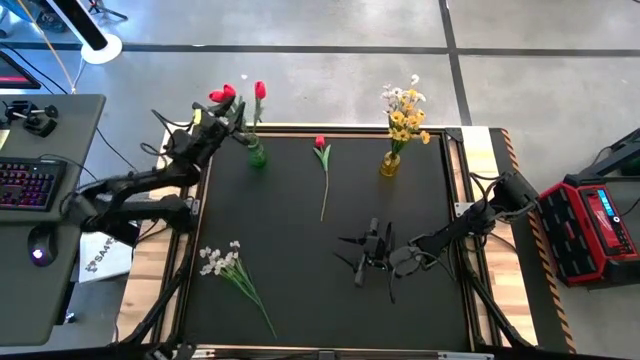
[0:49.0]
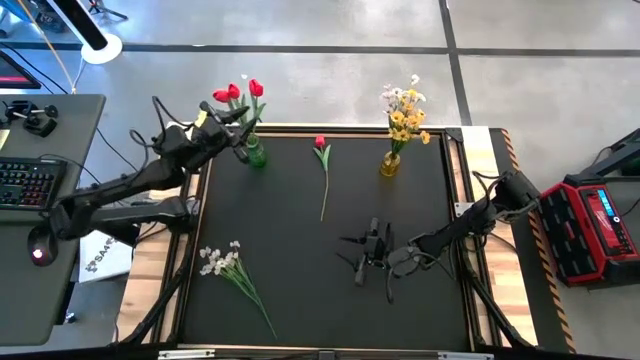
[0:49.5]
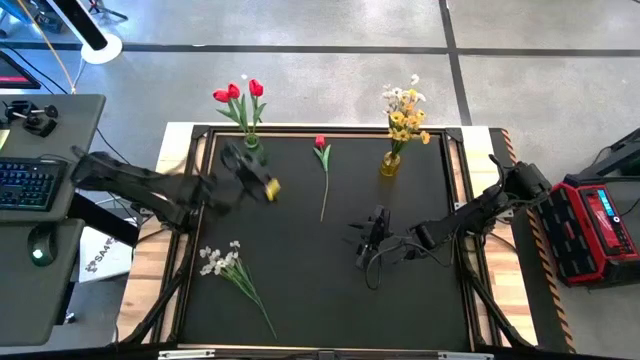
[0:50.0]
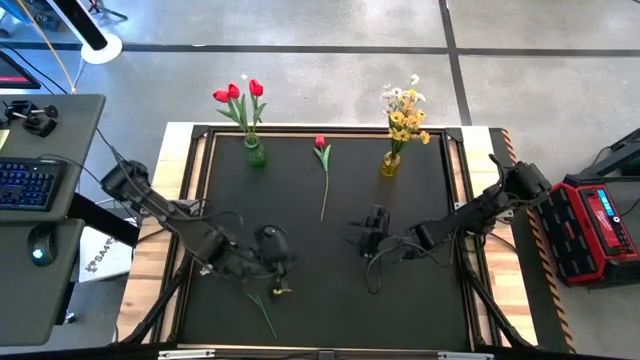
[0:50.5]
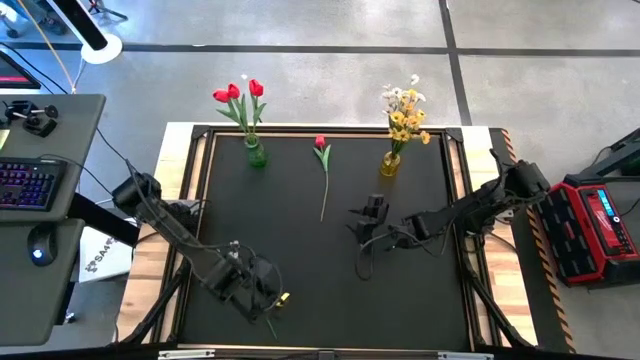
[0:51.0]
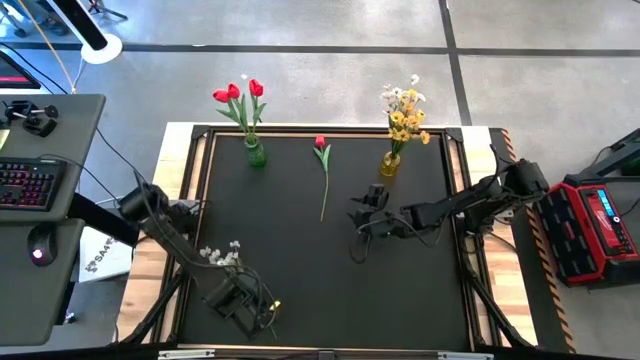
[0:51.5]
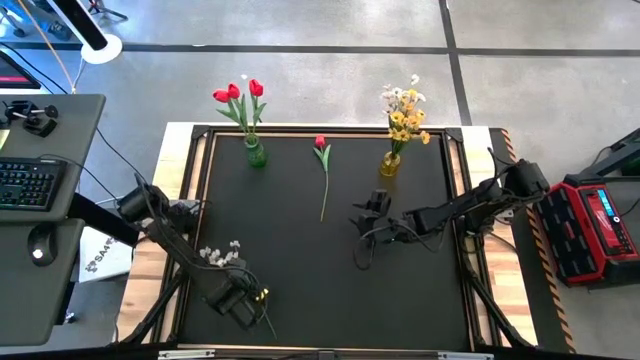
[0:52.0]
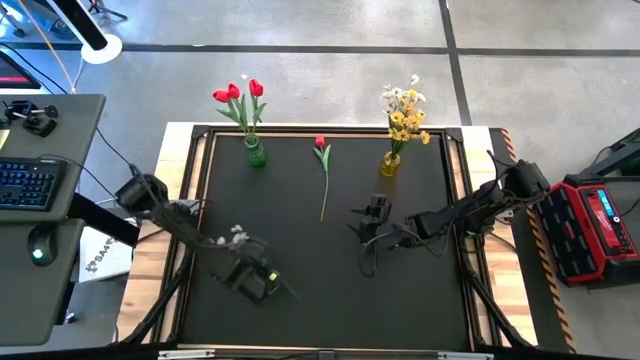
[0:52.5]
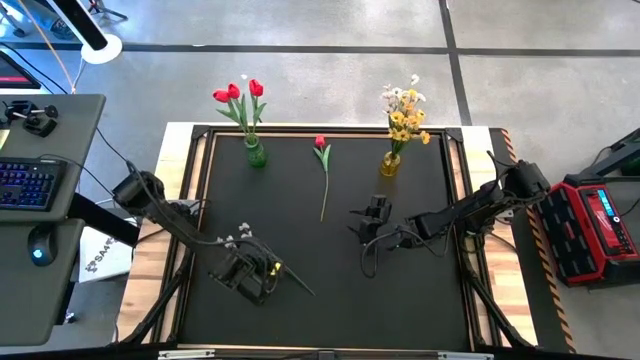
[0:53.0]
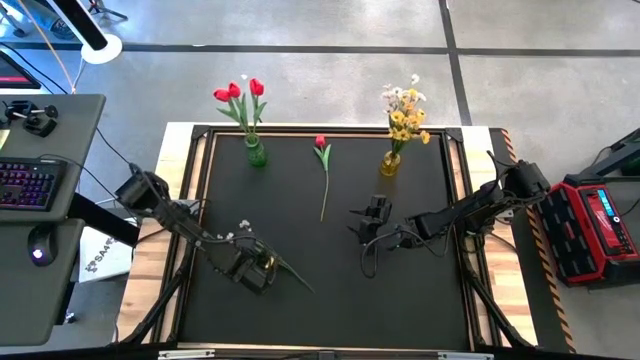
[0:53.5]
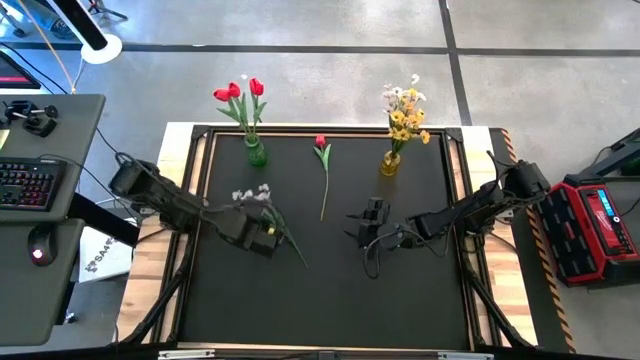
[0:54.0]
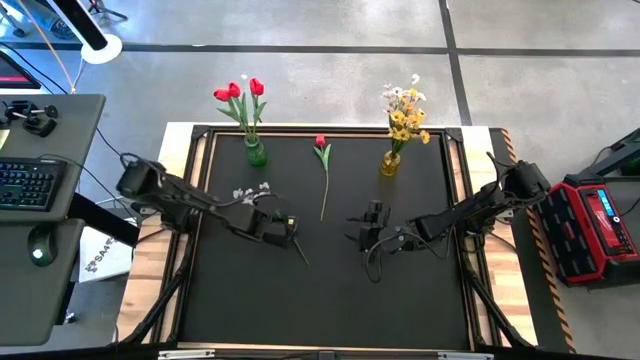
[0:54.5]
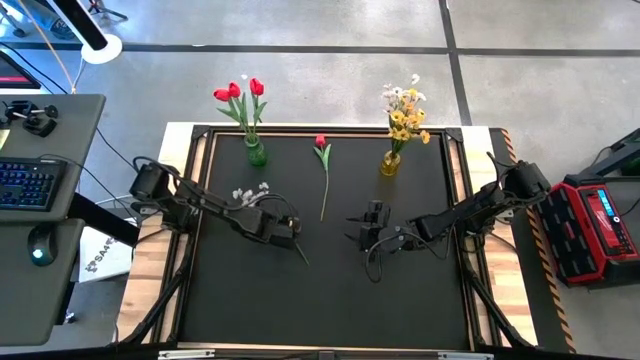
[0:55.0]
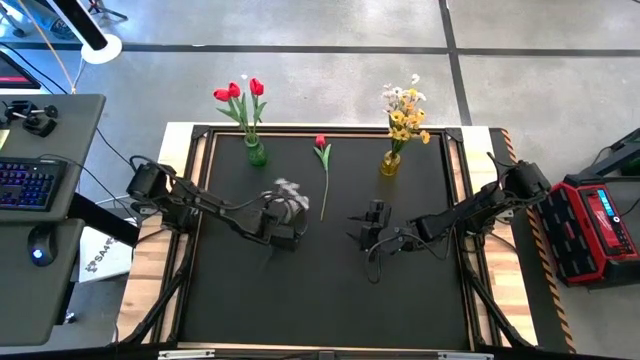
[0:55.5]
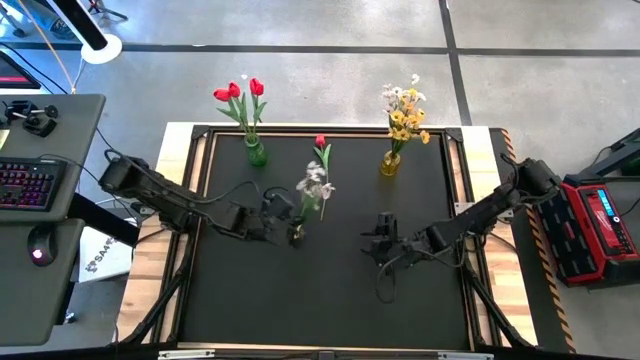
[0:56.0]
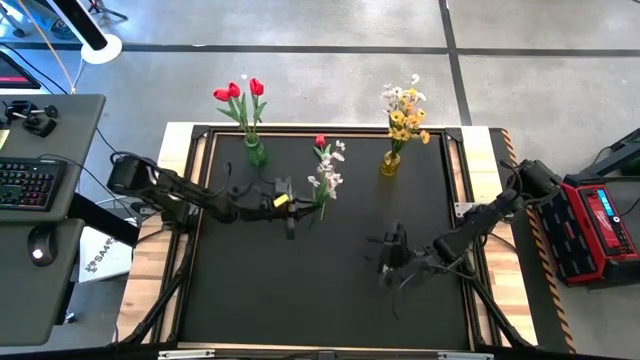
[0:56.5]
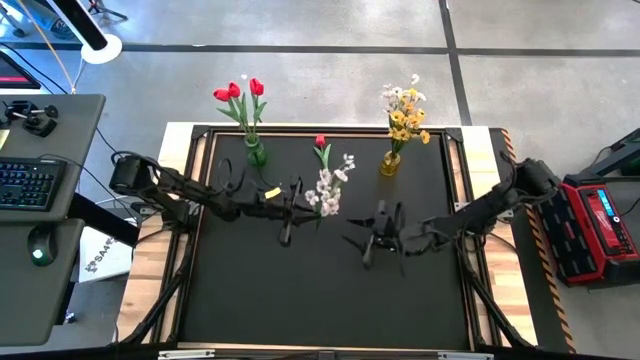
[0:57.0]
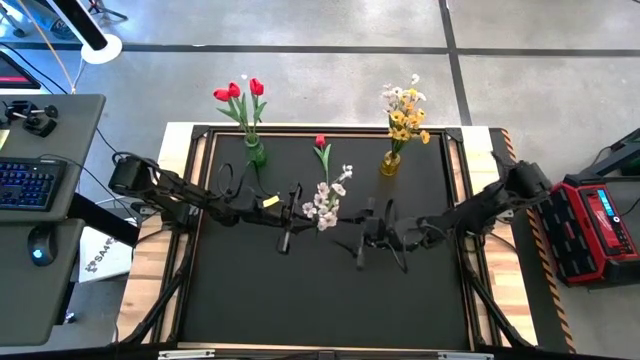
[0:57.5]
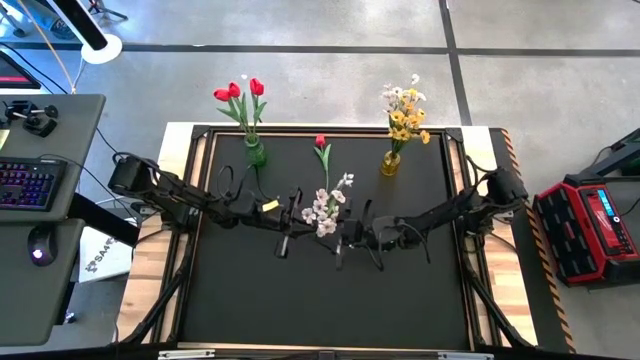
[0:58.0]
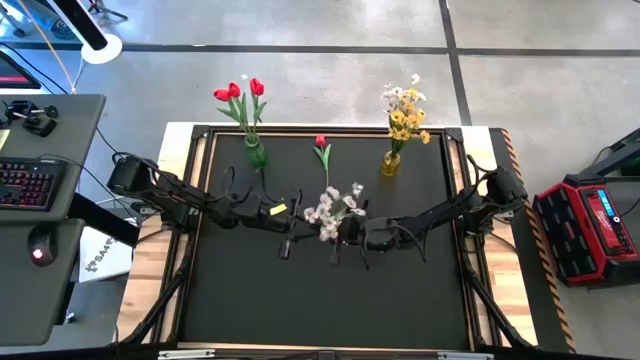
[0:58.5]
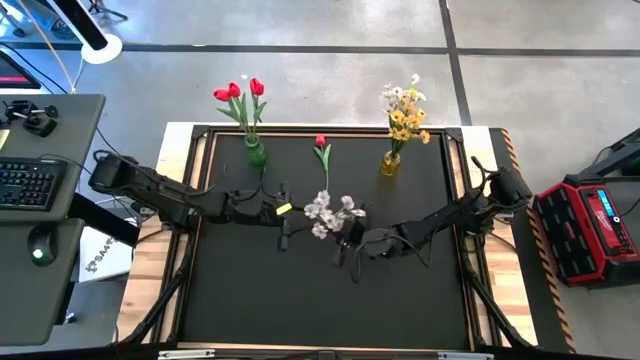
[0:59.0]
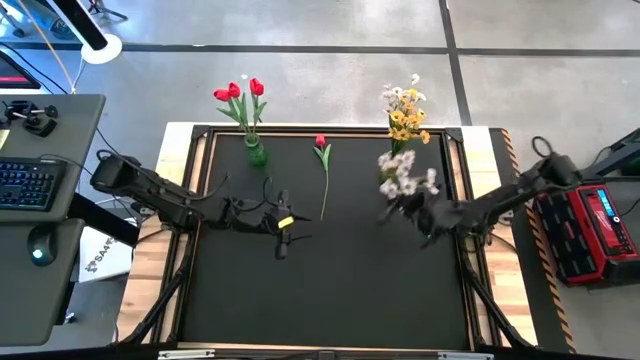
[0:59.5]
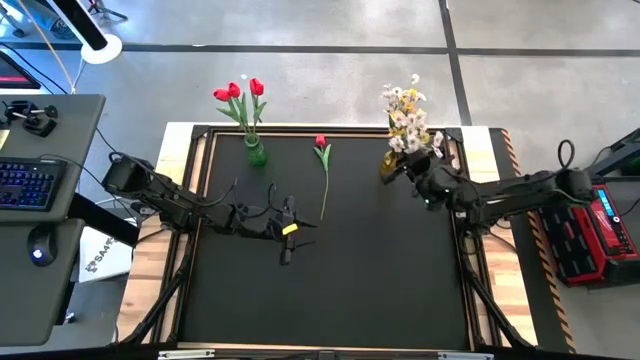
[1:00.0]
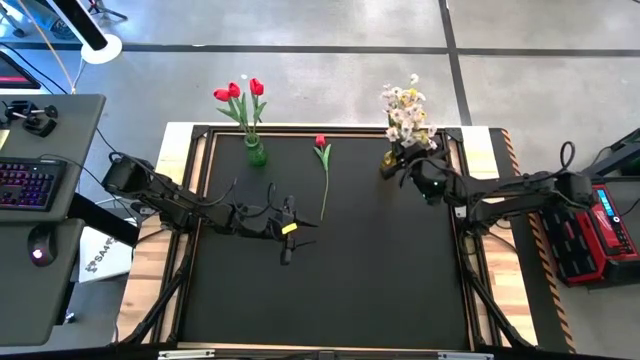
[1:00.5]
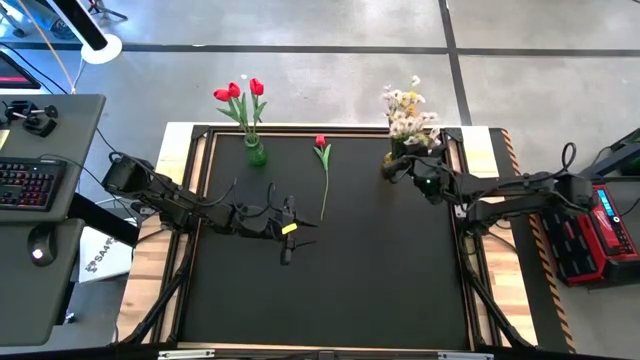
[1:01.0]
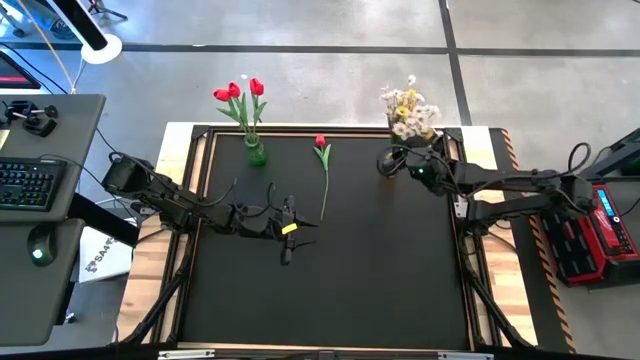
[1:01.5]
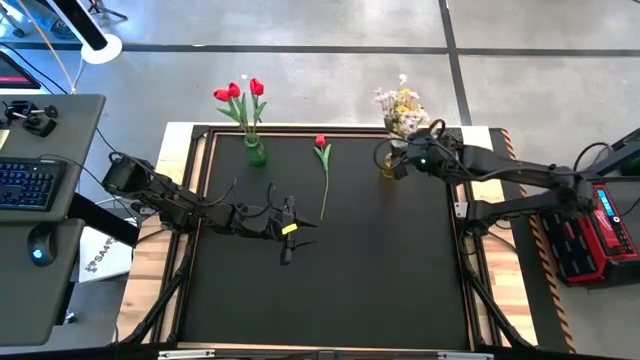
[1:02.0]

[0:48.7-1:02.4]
Task: Sort flowers into vase by color
Put the white flowers into the yellow flower vase

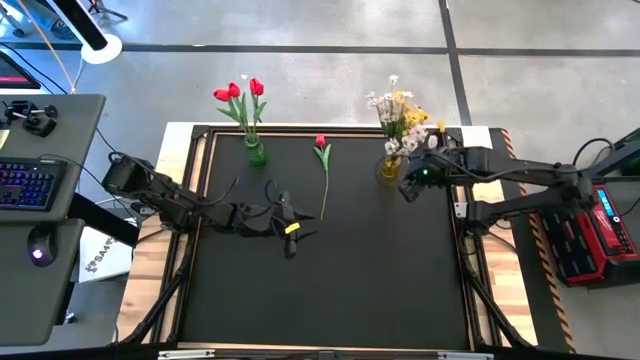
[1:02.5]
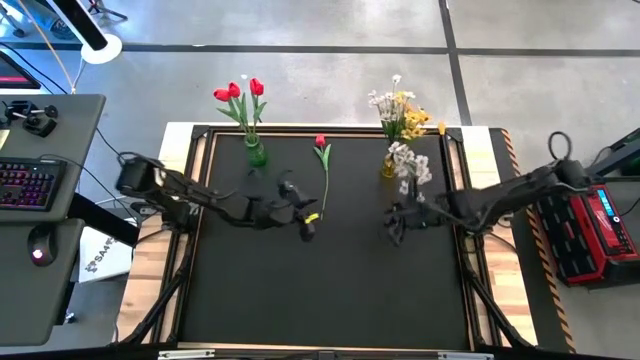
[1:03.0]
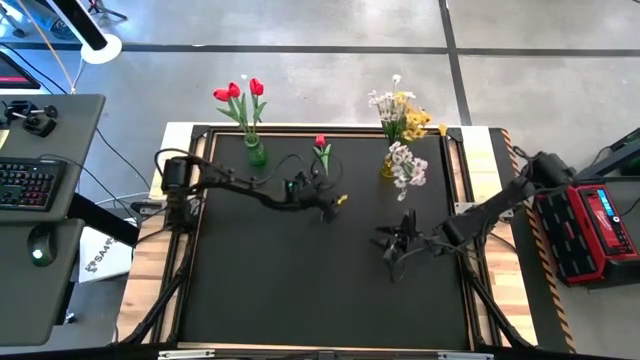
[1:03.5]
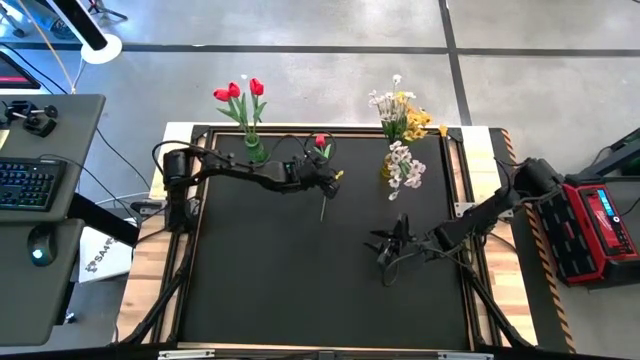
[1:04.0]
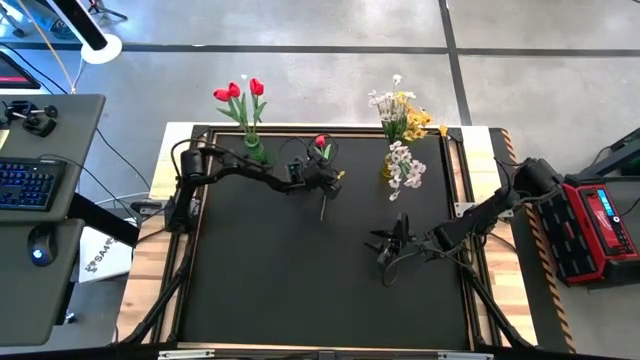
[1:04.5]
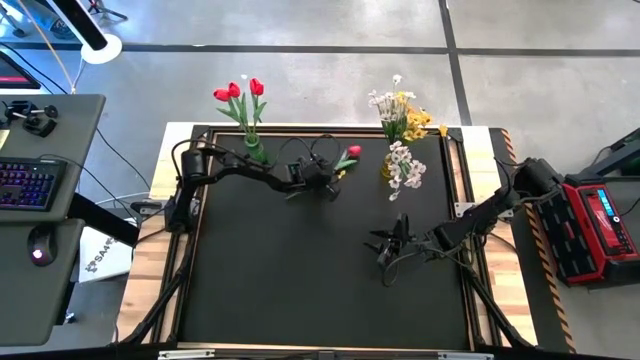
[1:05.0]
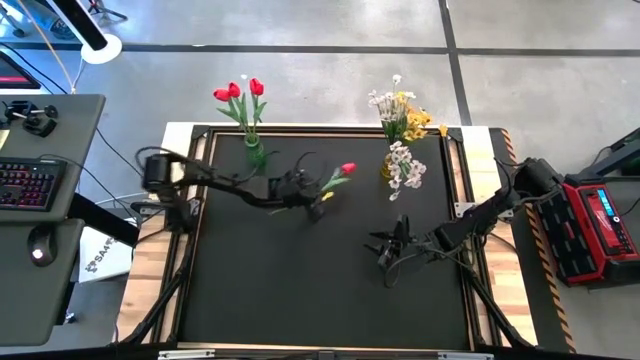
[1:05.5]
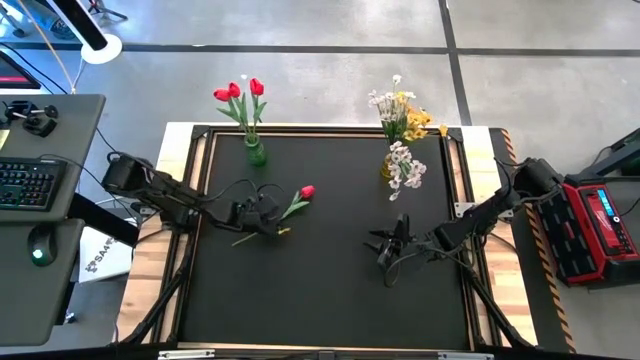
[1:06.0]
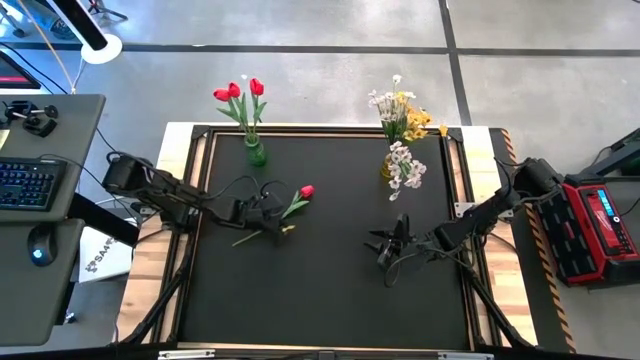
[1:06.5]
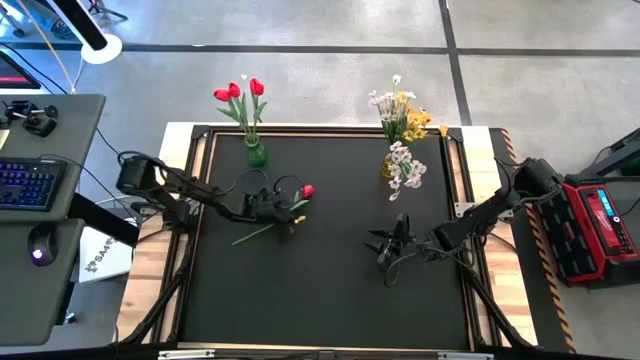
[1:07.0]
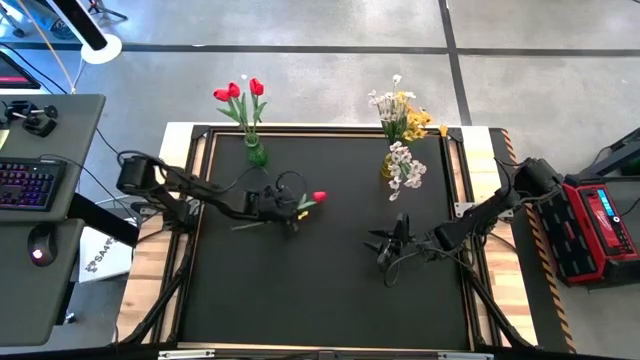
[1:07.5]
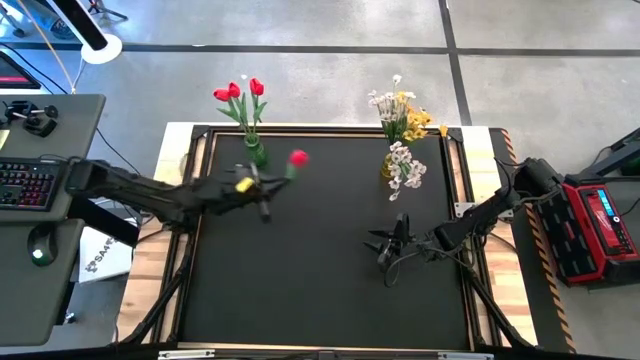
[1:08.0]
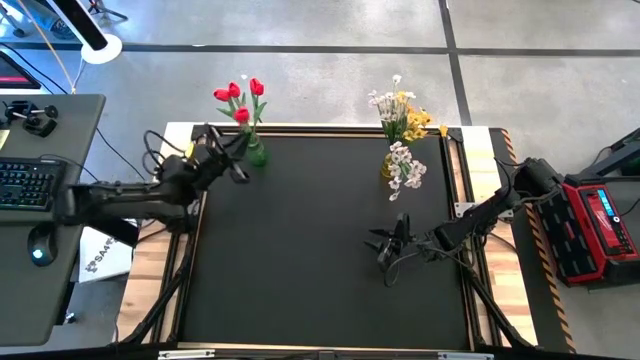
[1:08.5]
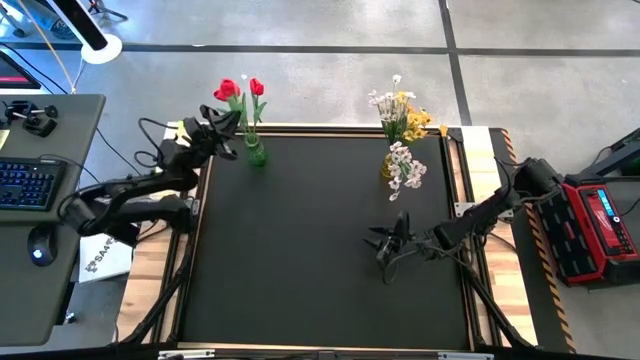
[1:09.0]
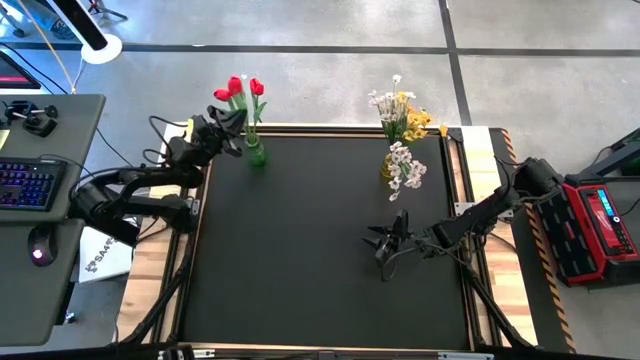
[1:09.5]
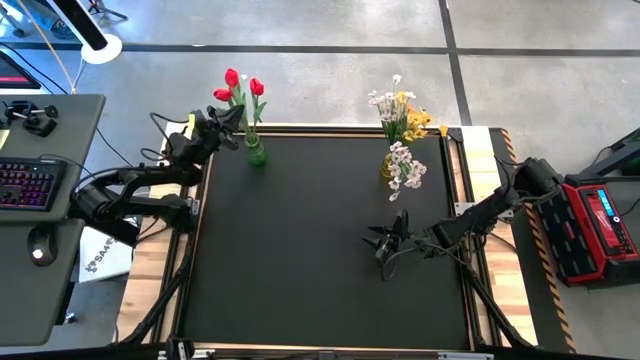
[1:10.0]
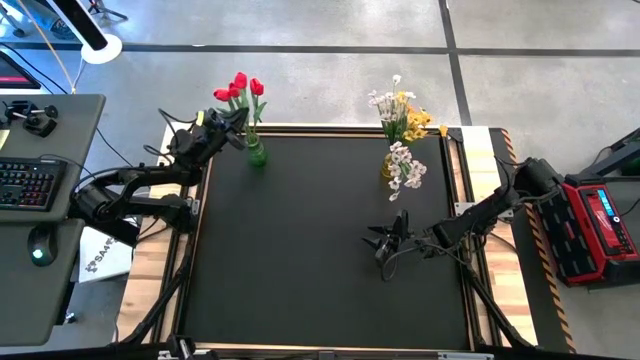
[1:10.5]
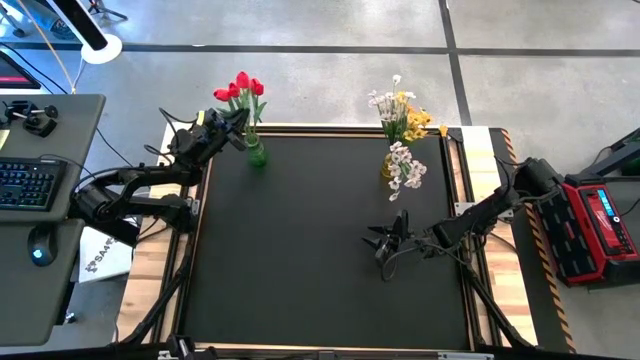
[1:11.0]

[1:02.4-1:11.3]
Put the red tulip into the green flower vase
